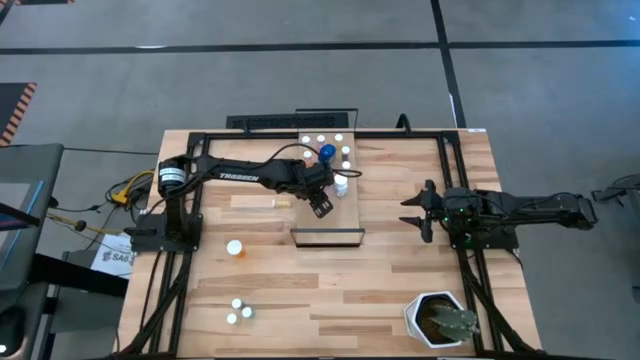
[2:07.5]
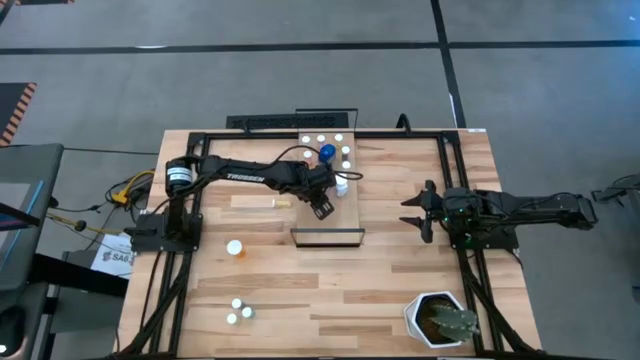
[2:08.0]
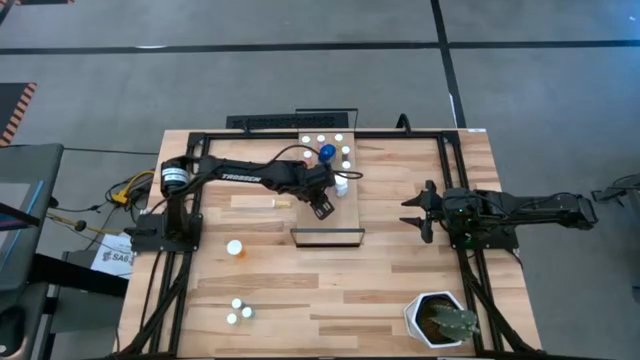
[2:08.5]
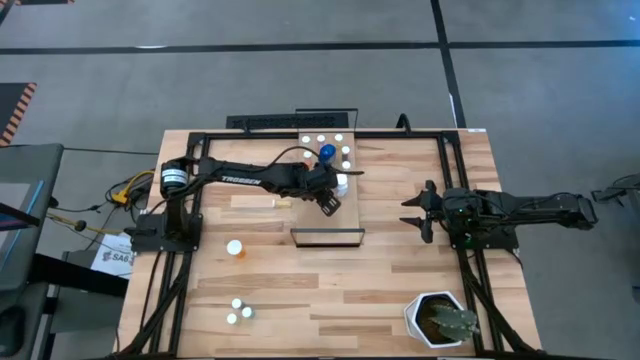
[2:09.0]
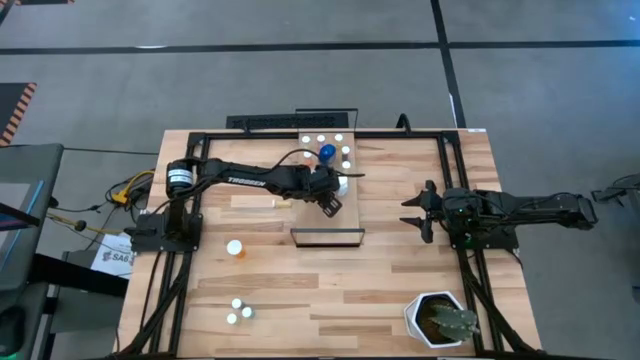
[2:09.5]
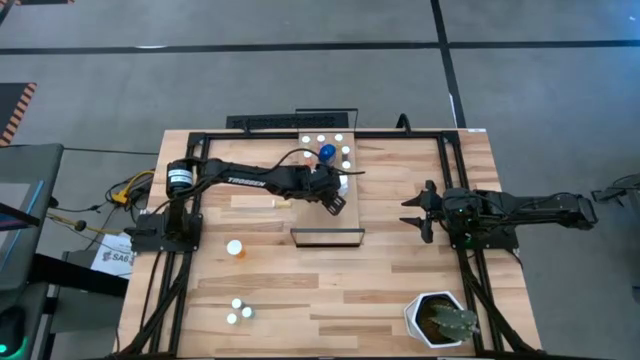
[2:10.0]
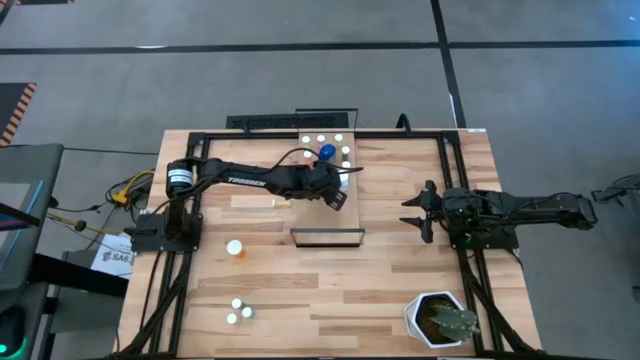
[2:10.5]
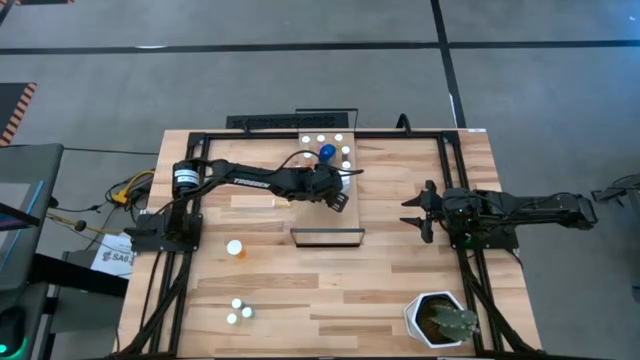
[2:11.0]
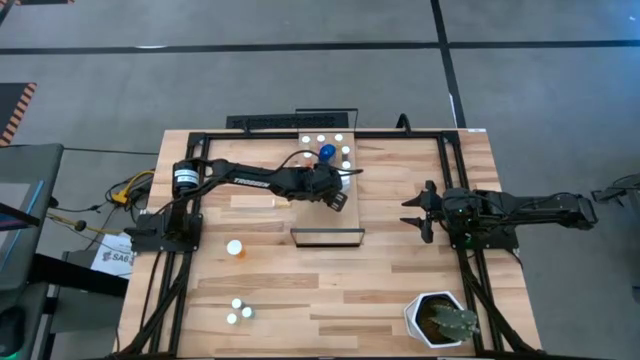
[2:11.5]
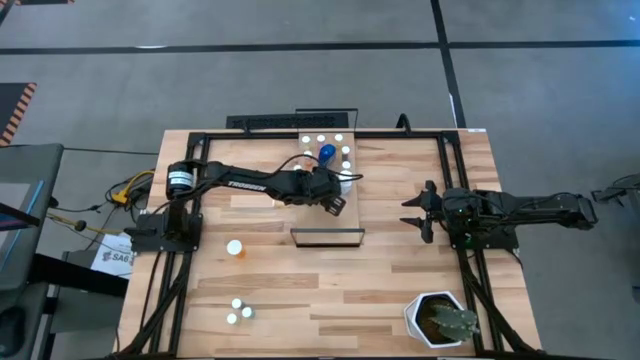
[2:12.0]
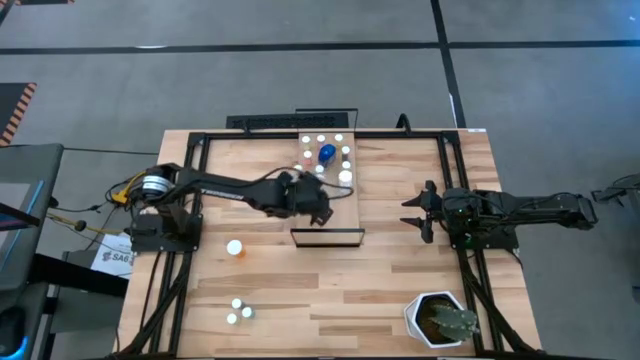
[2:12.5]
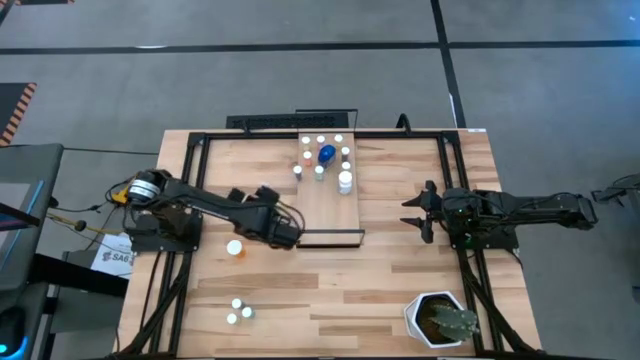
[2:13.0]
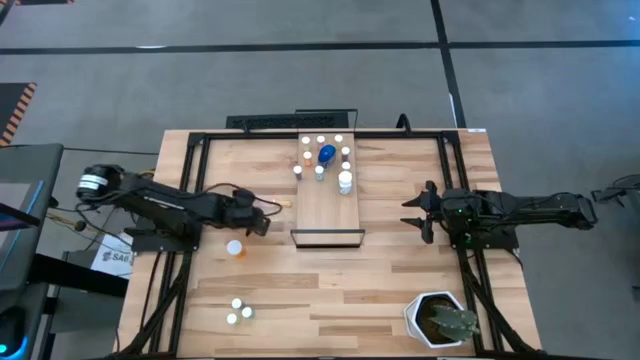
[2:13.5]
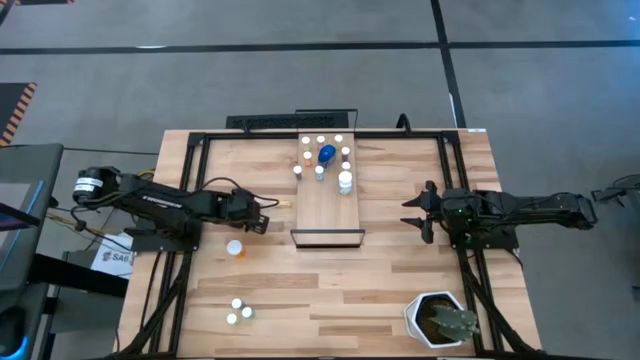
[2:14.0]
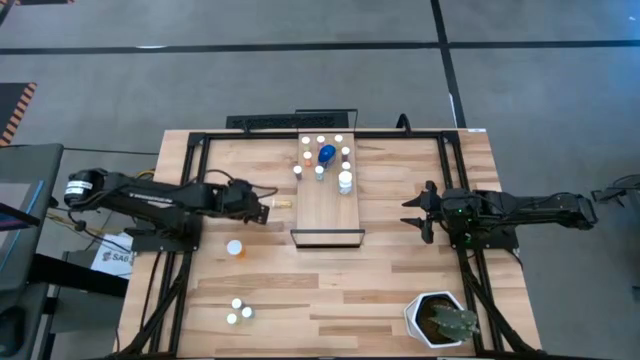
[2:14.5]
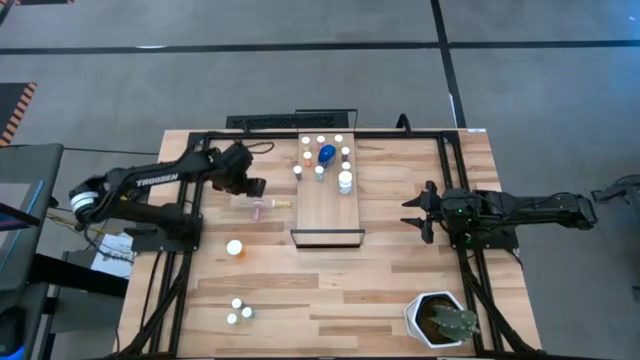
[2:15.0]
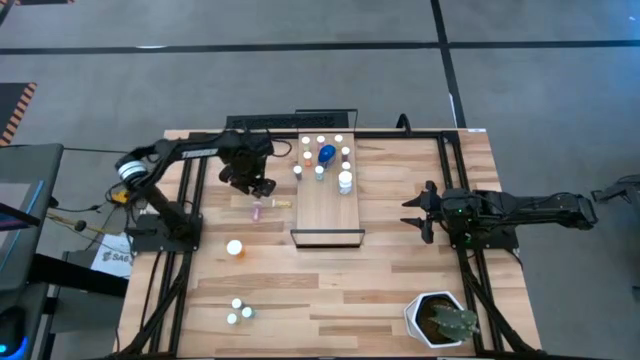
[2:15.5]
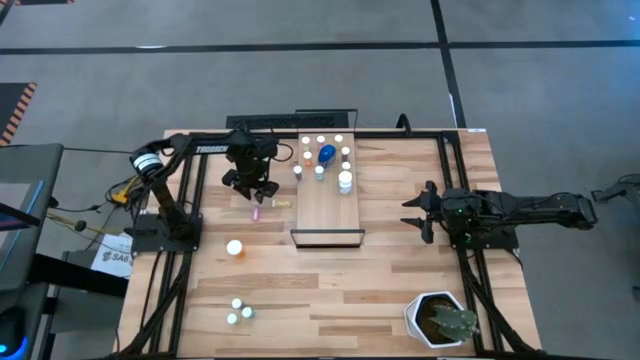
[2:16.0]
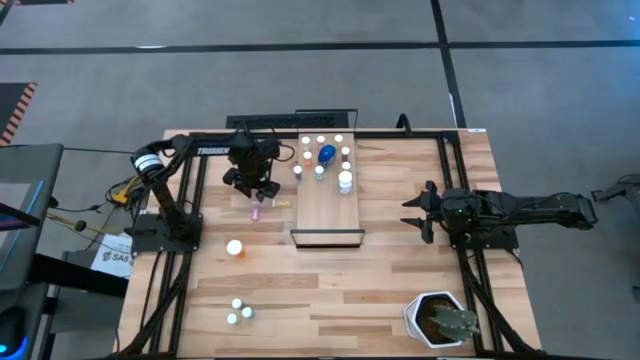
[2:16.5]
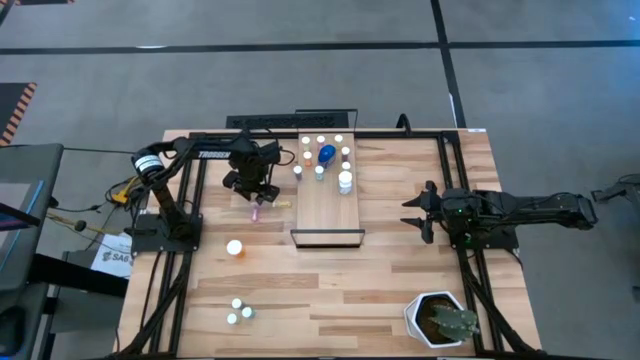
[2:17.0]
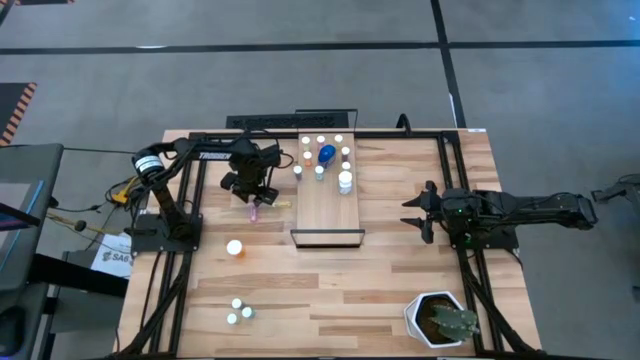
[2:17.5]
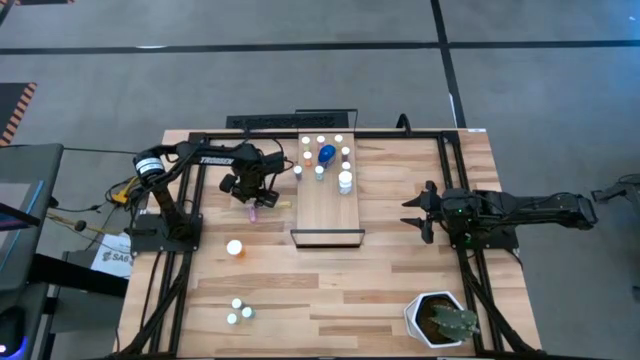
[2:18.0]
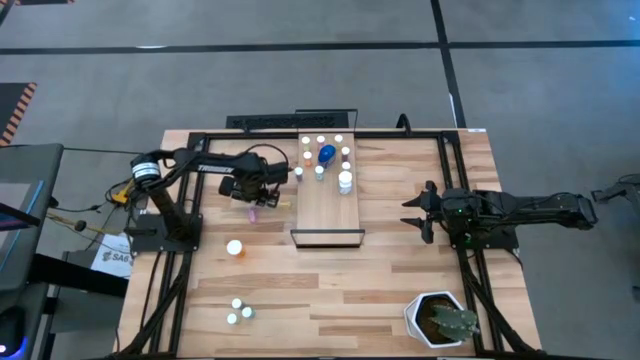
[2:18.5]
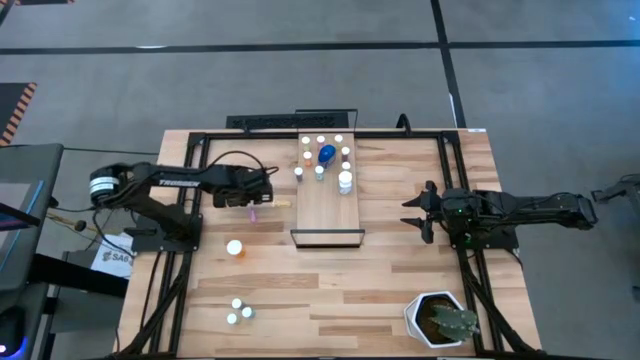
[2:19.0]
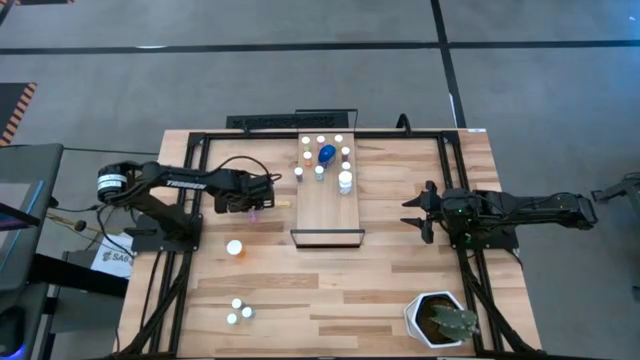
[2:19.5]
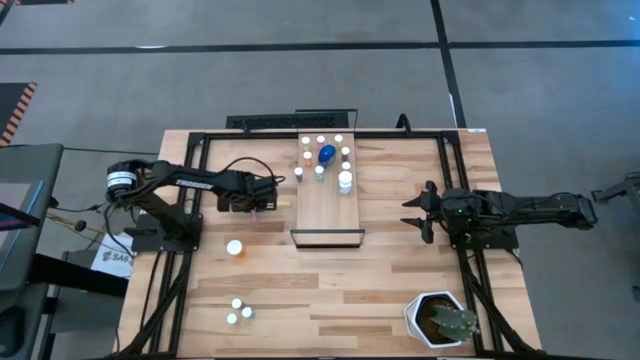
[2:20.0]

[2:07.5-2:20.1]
Task: Pick and place medicine bottles onto shelf by color
Put the pink pill bottle on the shelf

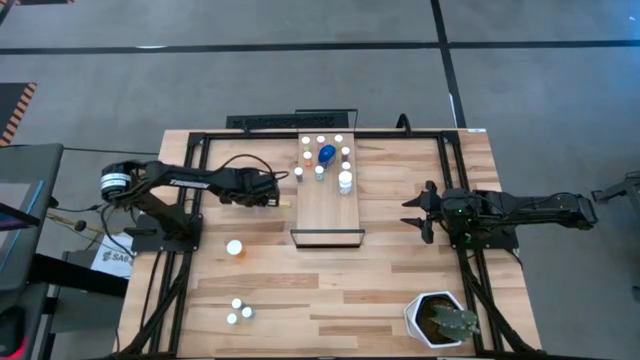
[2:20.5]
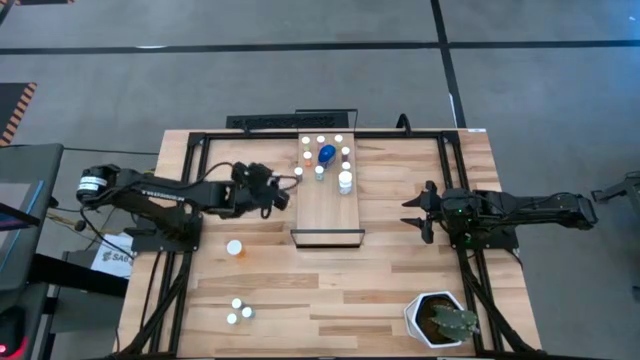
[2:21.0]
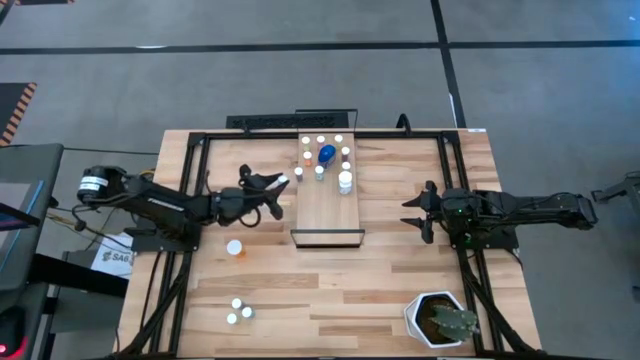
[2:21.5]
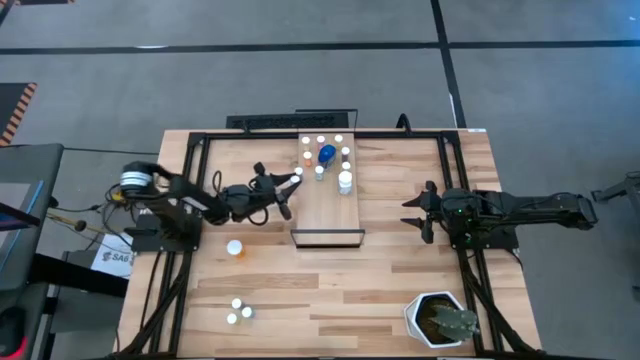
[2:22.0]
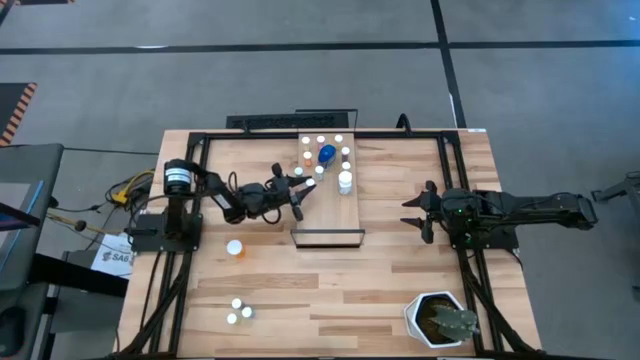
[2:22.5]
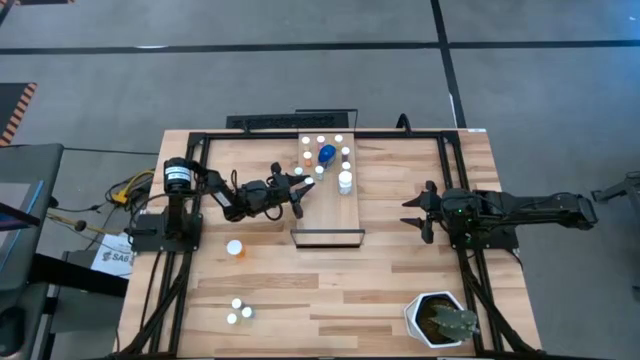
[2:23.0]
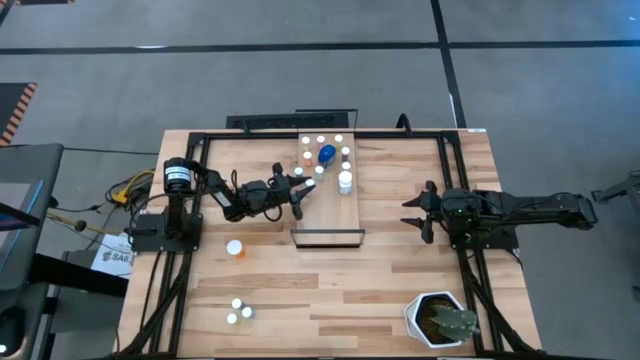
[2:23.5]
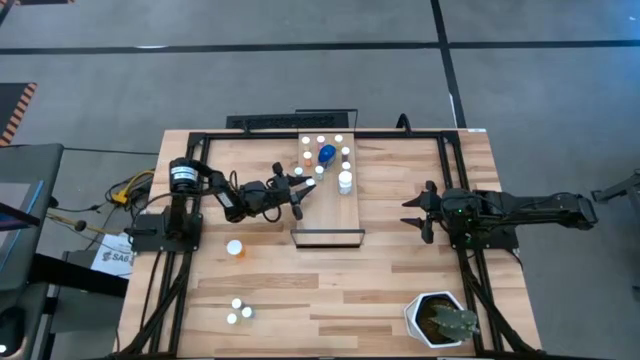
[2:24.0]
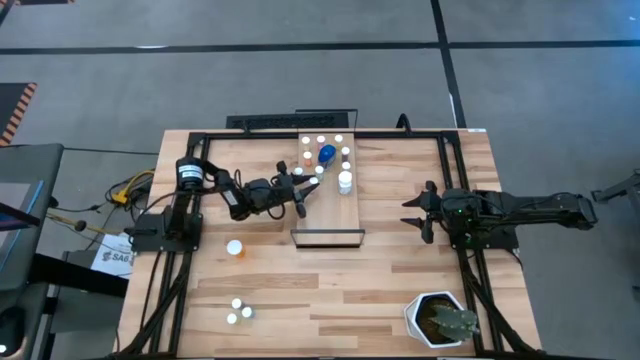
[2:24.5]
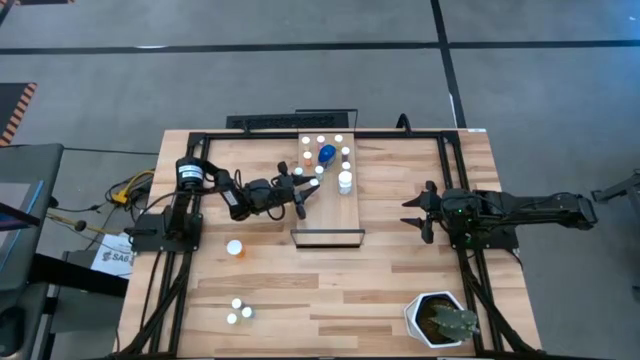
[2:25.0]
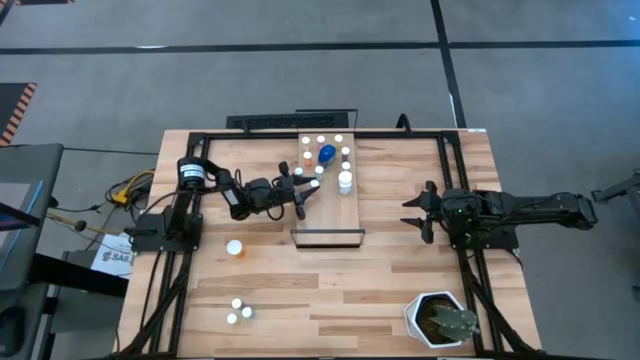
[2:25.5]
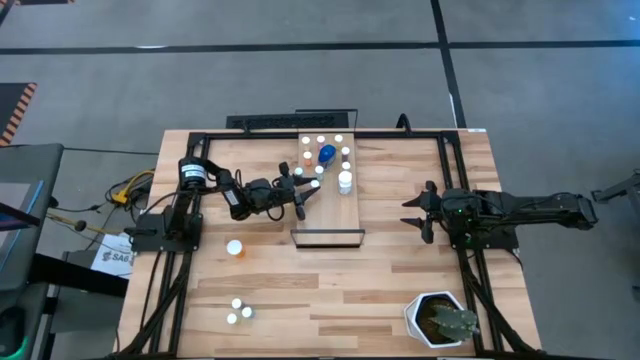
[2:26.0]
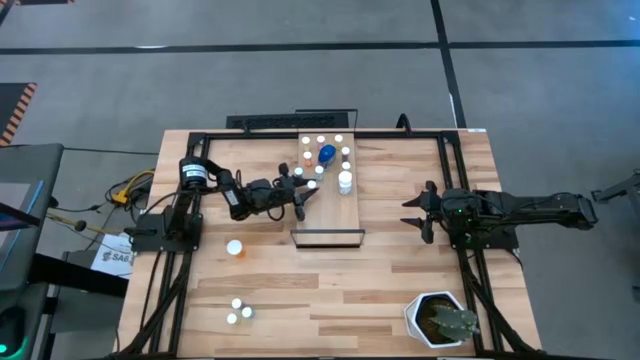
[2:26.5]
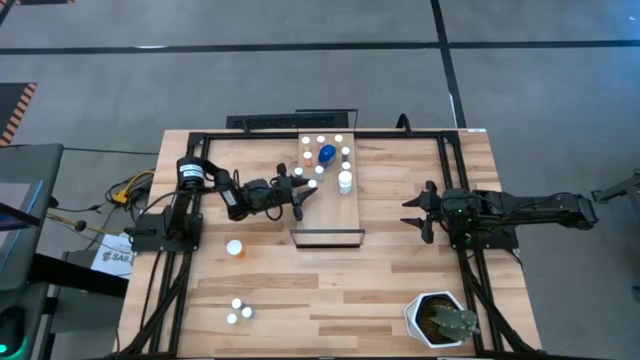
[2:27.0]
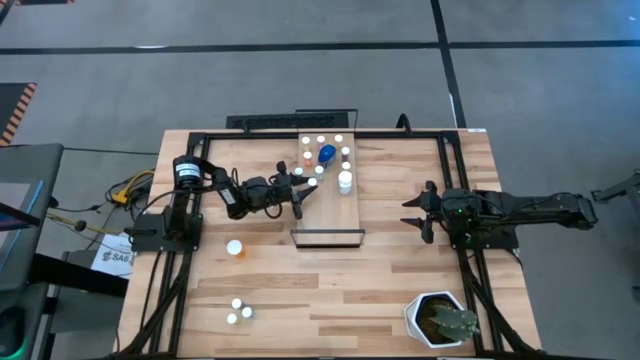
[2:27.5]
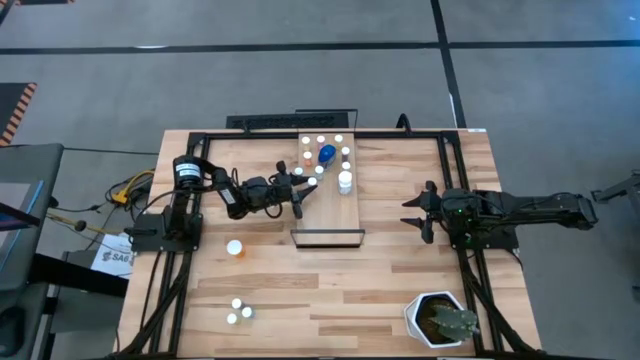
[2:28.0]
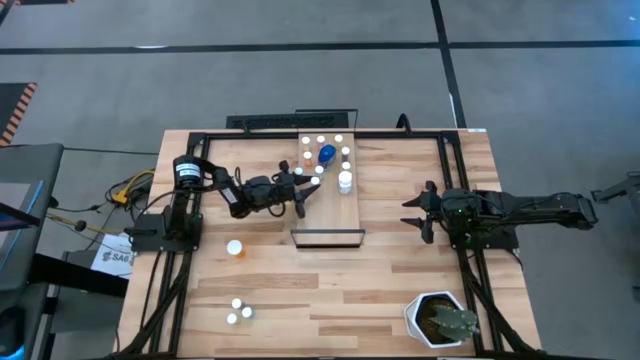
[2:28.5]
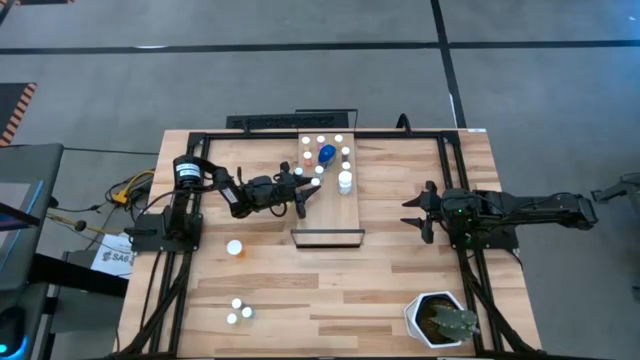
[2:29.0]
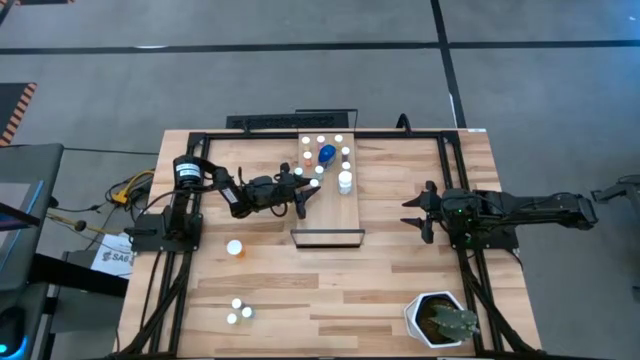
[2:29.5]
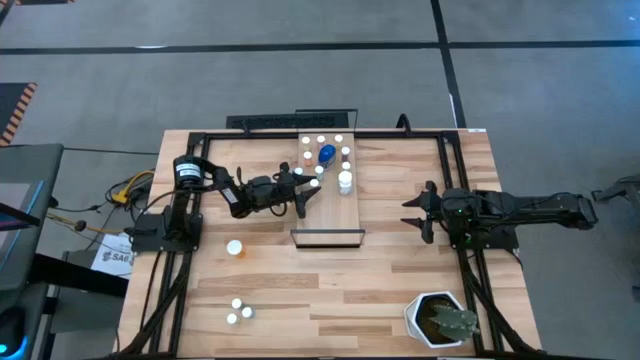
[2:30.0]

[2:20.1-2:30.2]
Put the pink pill bottle on the shelf
